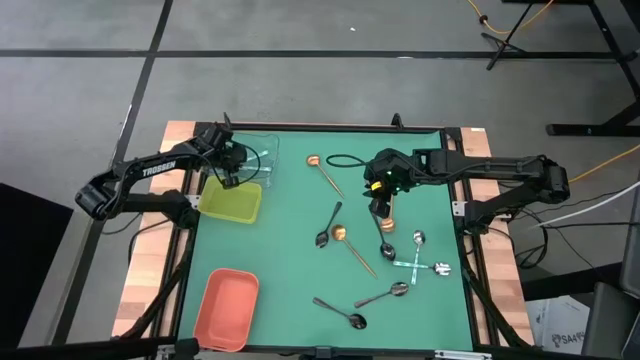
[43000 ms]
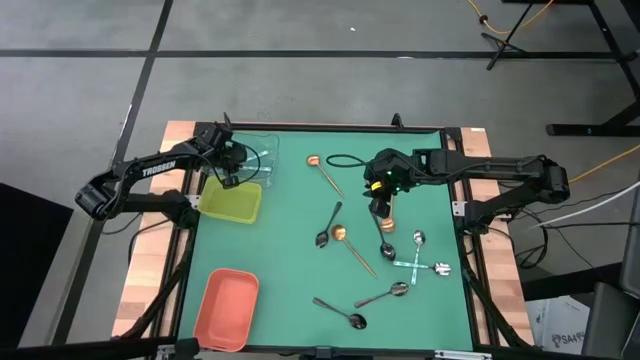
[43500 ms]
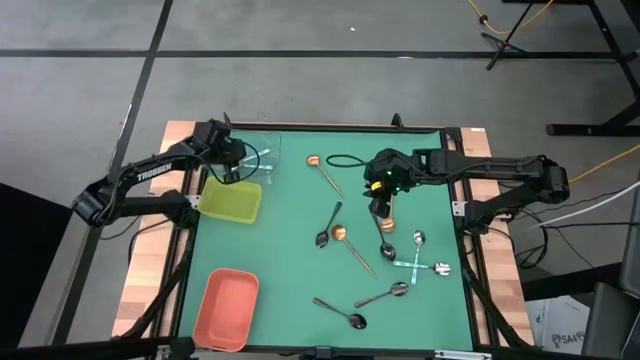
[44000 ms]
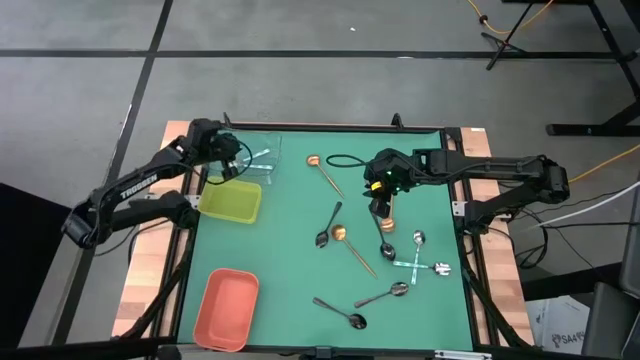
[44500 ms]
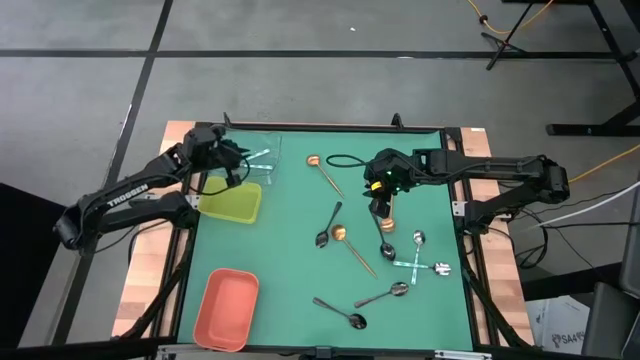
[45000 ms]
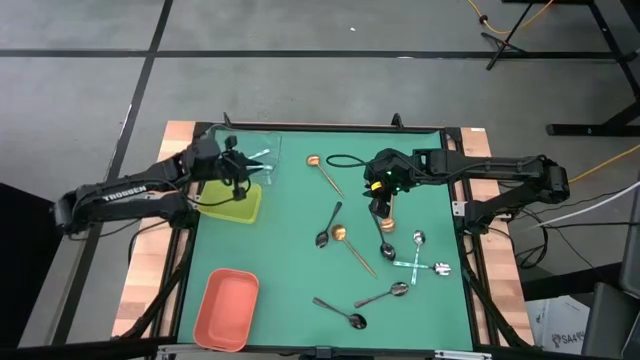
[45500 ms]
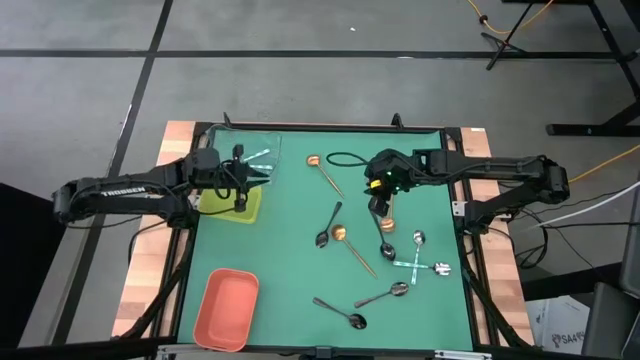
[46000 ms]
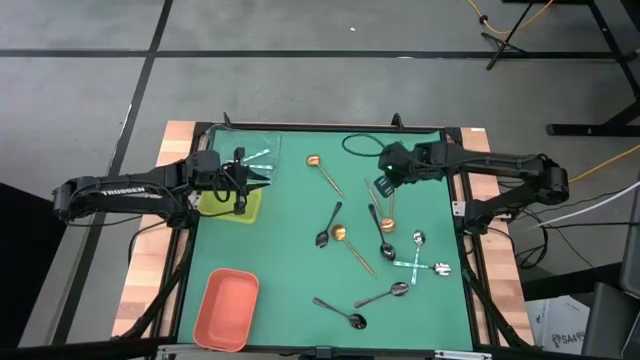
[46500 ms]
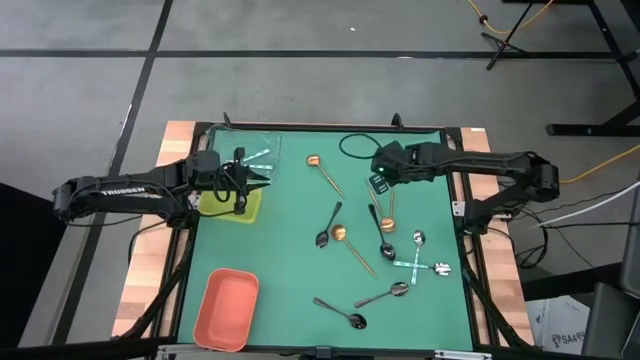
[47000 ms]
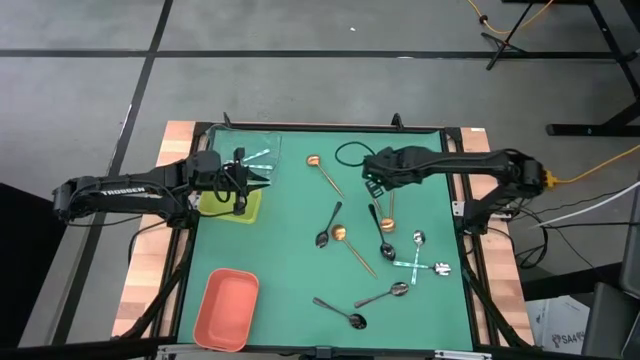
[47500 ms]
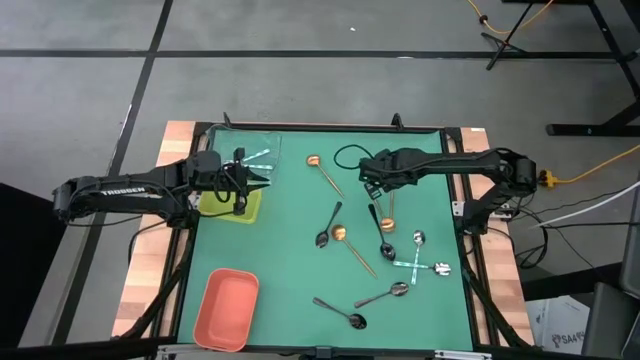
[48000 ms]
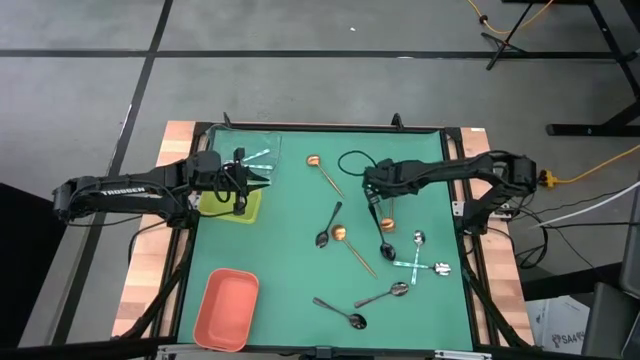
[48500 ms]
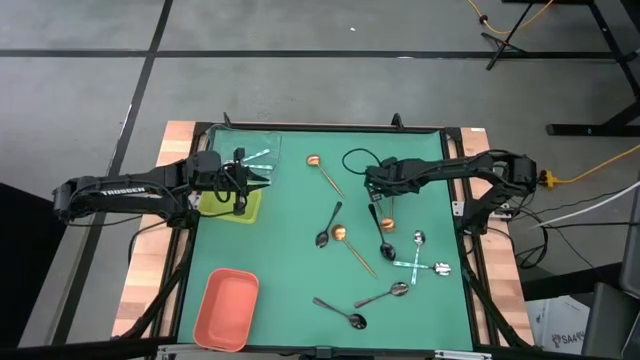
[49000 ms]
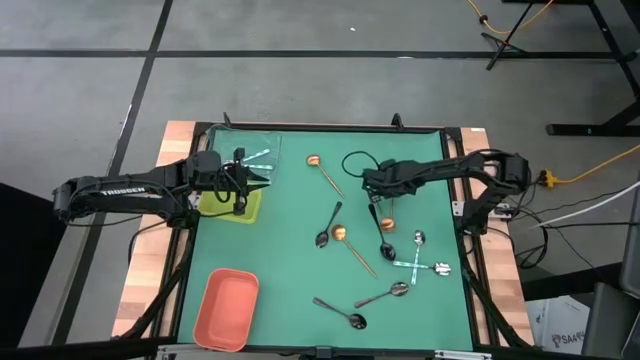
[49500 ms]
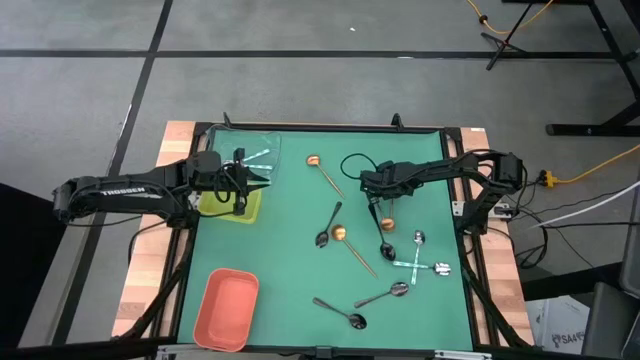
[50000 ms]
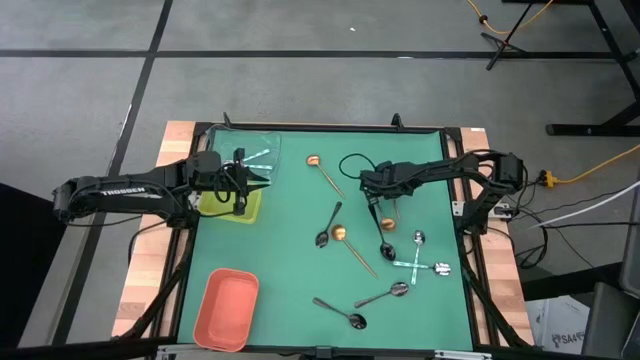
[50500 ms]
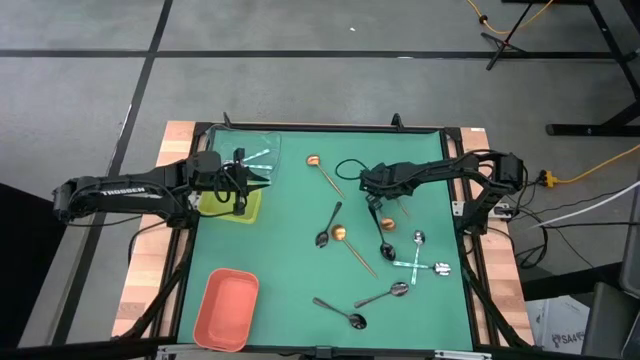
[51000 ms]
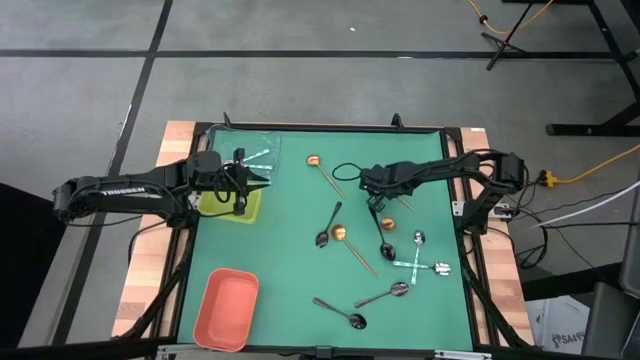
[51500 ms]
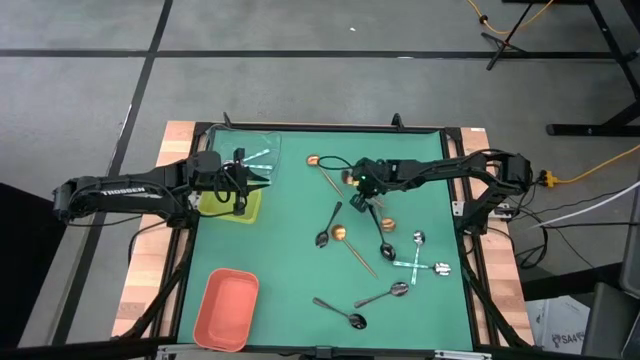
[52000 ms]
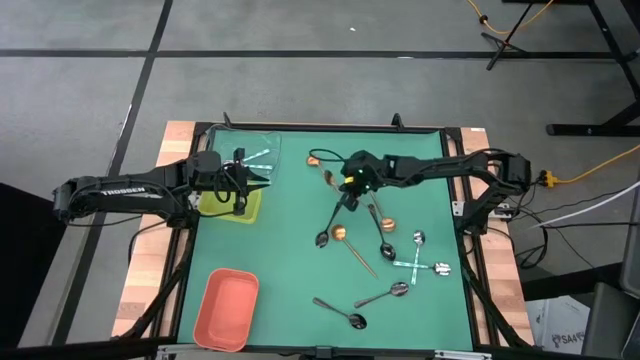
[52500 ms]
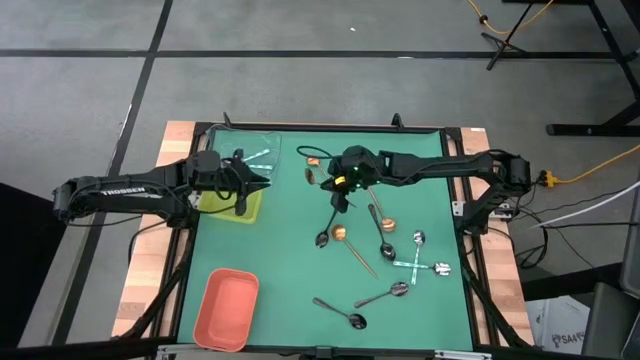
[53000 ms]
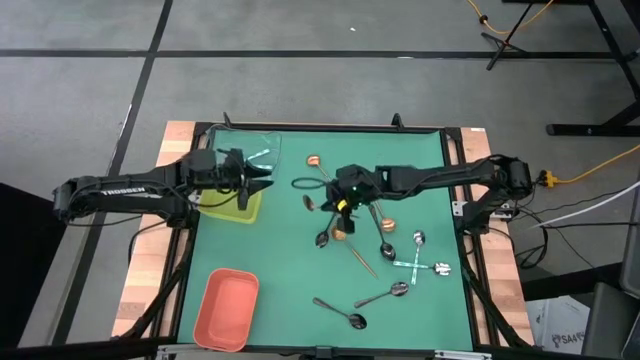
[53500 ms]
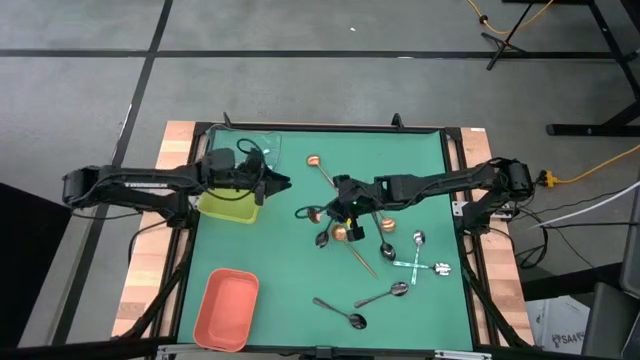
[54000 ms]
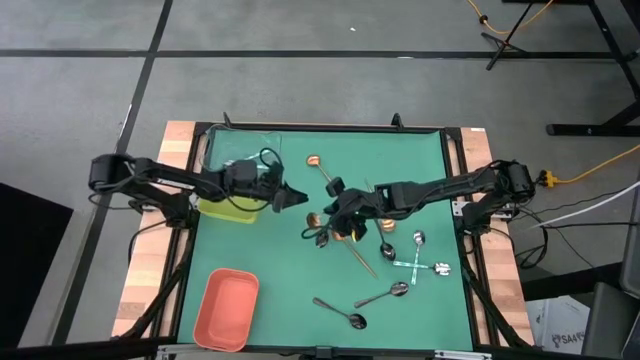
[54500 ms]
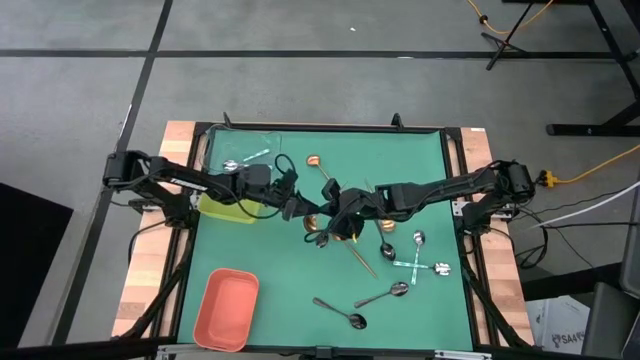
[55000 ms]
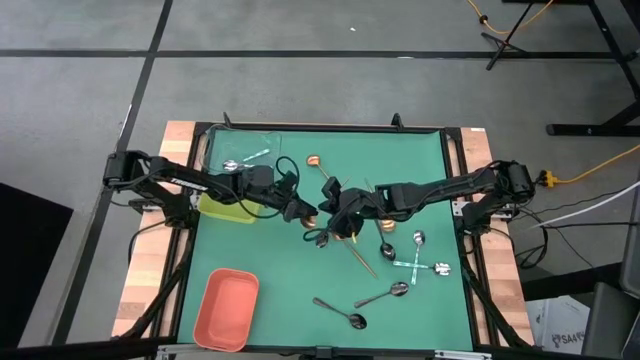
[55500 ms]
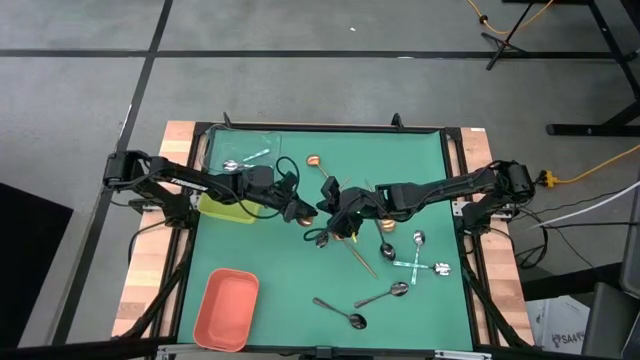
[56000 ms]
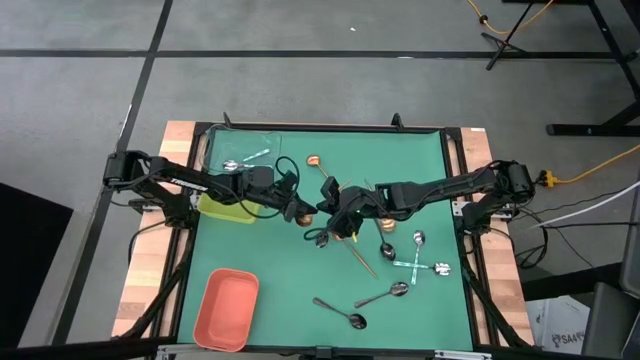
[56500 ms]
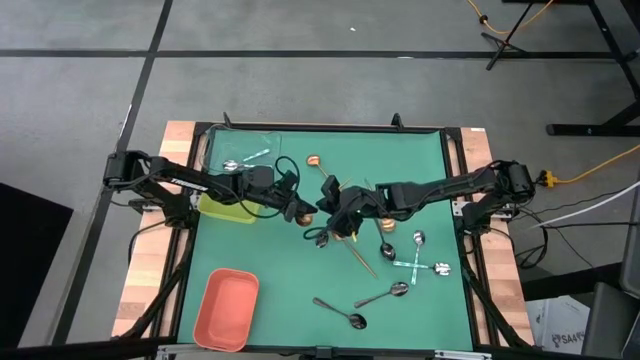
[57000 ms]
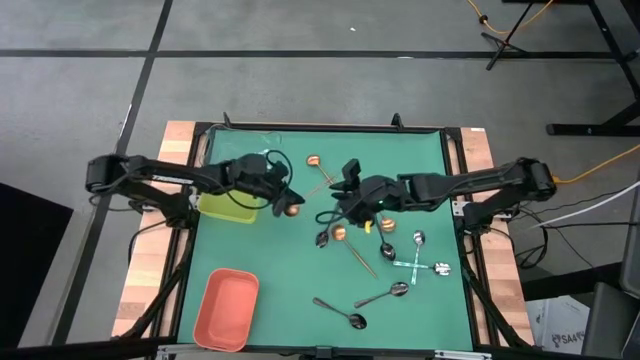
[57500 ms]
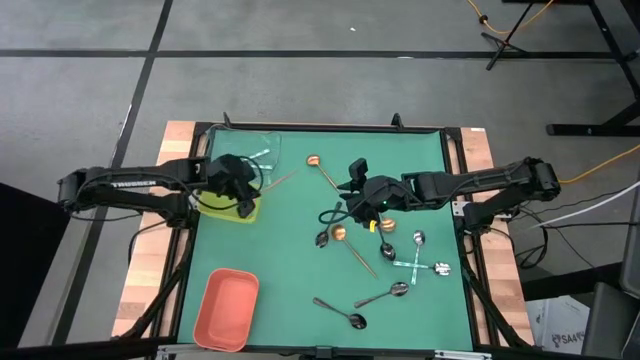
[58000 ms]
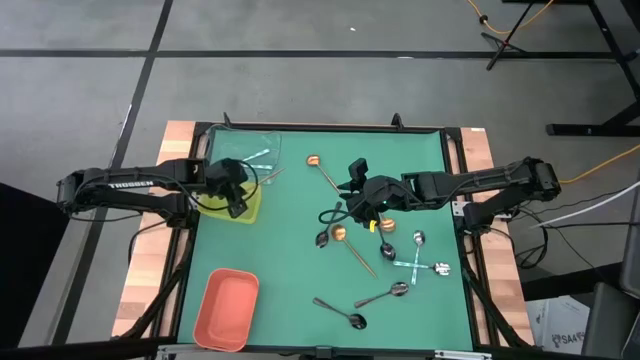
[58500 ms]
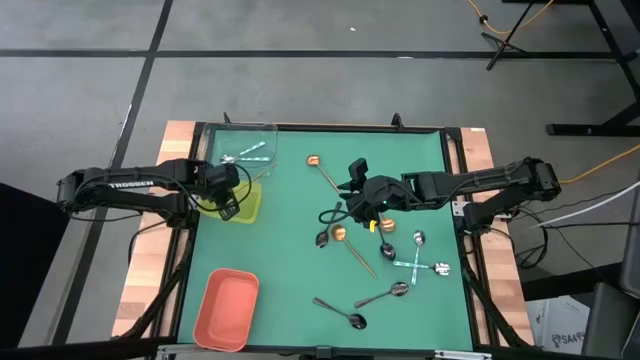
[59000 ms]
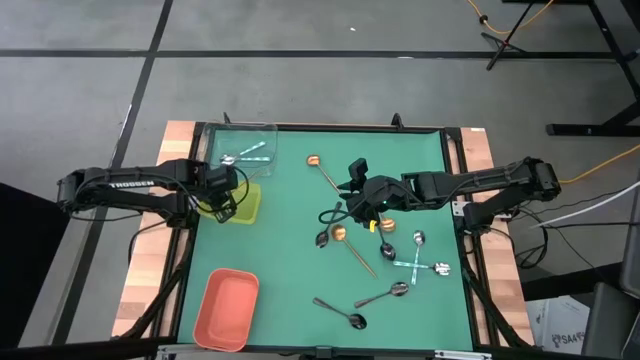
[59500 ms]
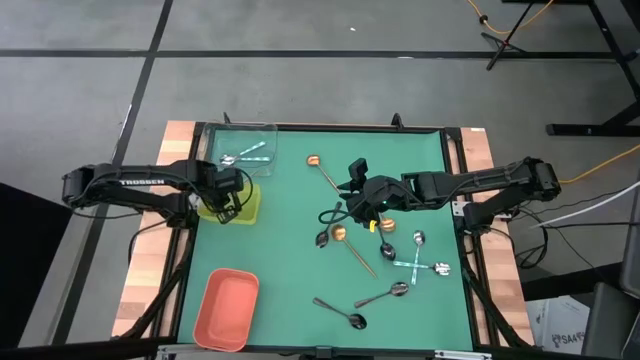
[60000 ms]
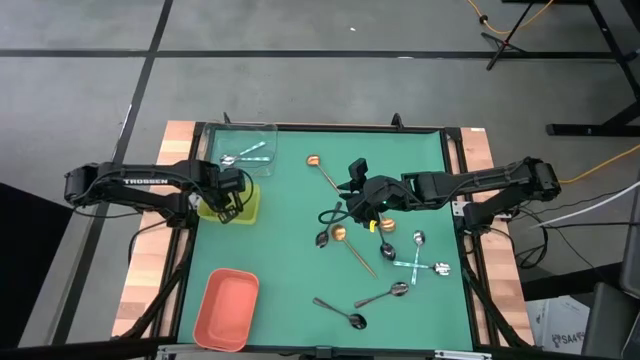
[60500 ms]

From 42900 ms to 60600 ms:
Task: Sort silverware by color (type)
Put the gold spoon into the yellow bin
